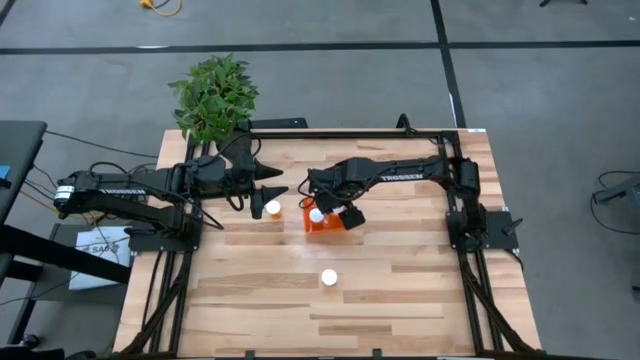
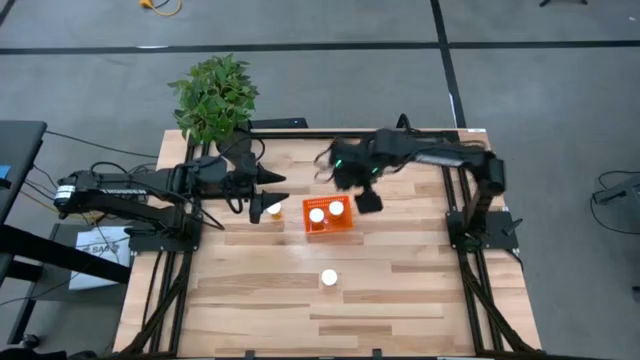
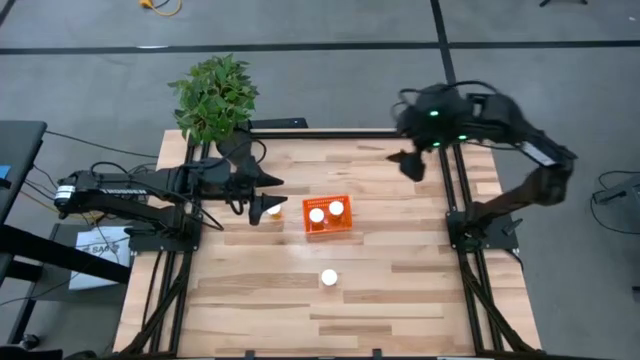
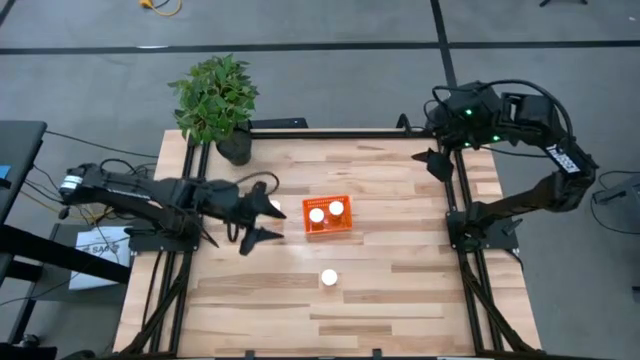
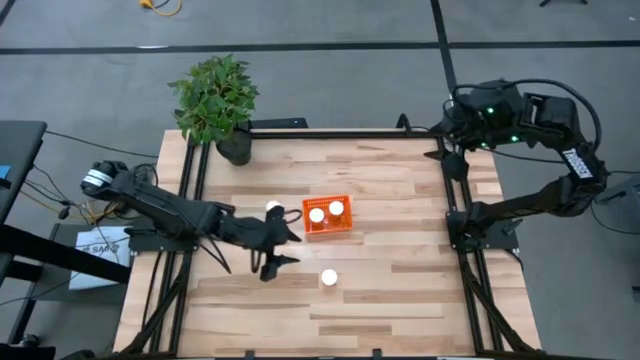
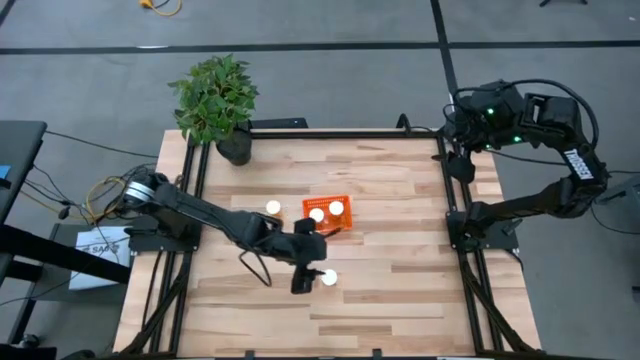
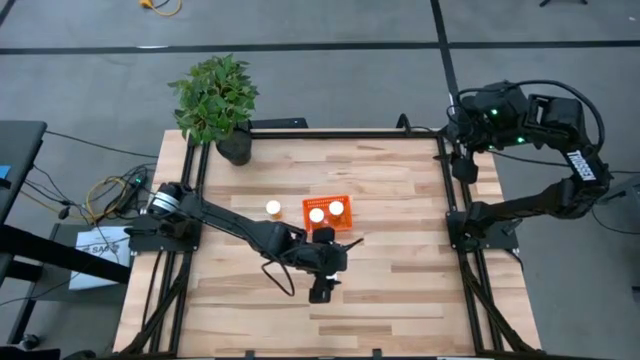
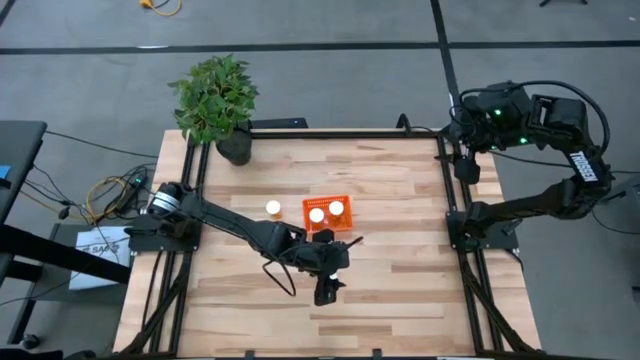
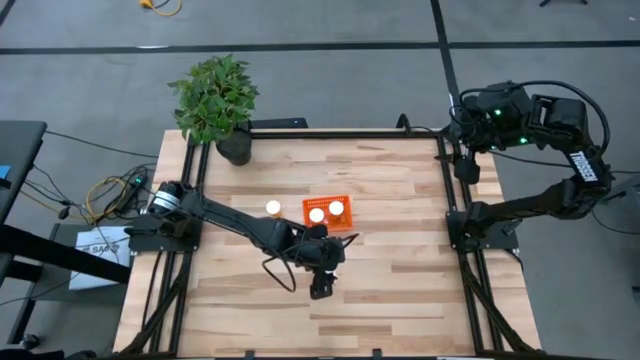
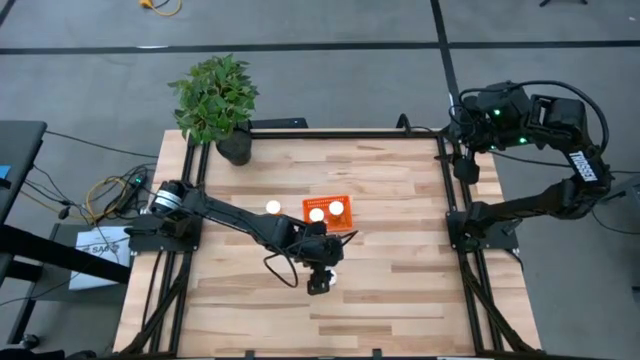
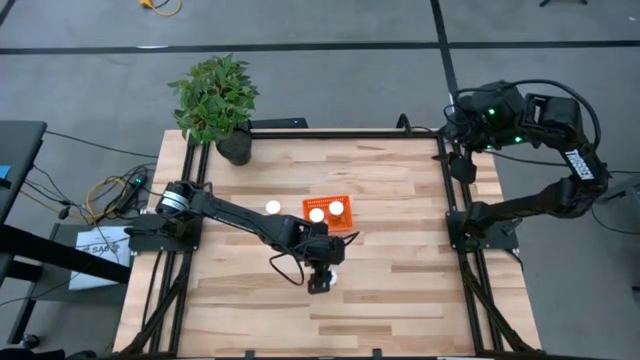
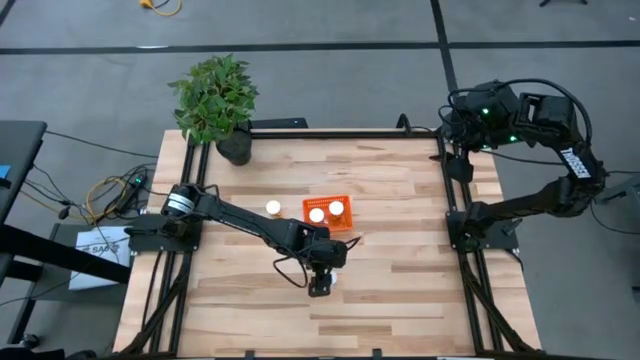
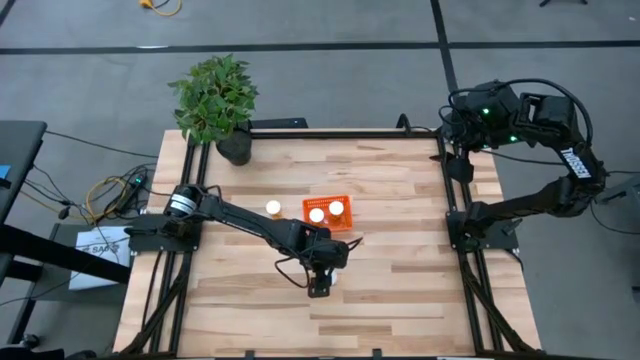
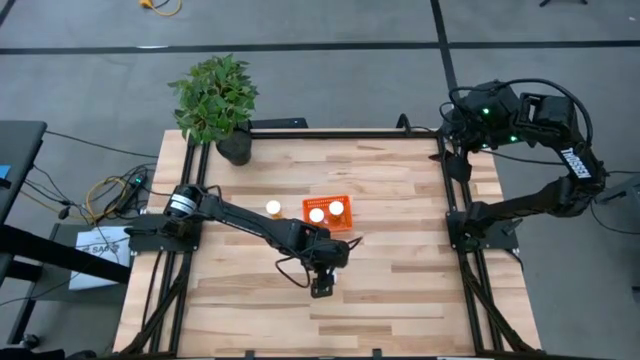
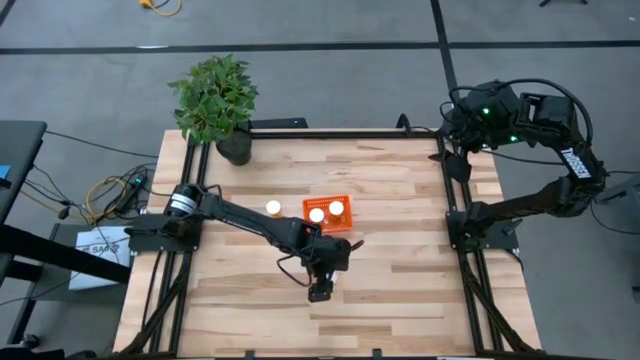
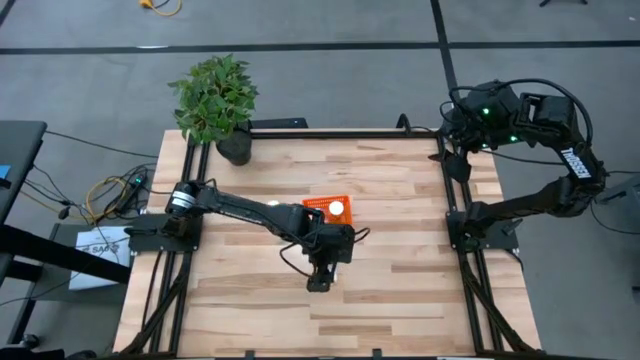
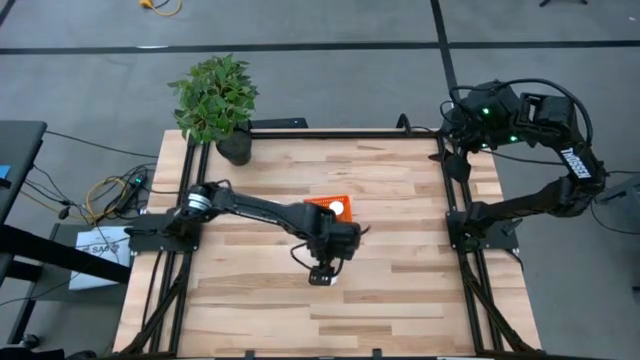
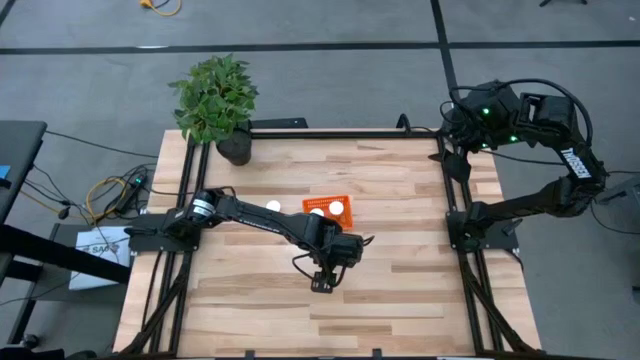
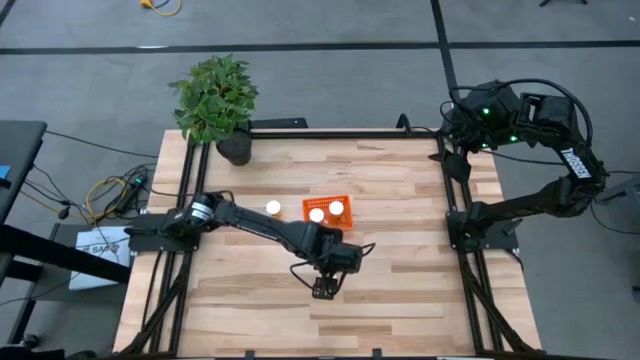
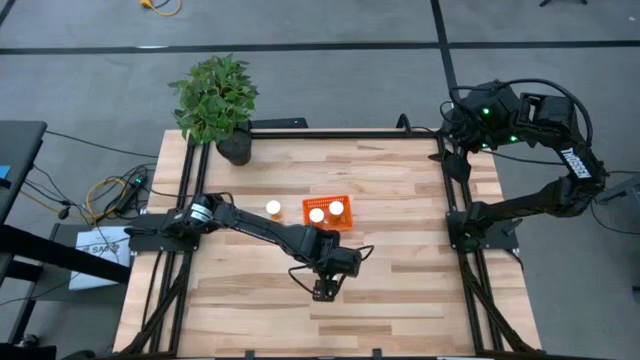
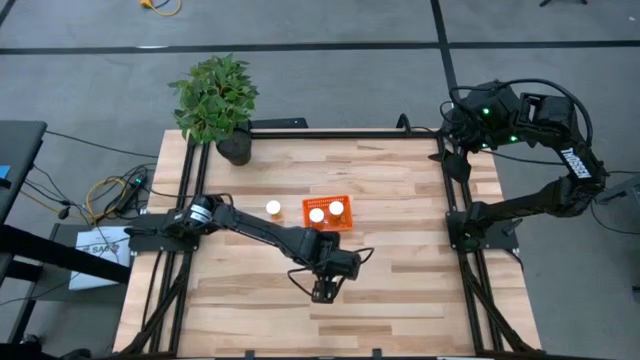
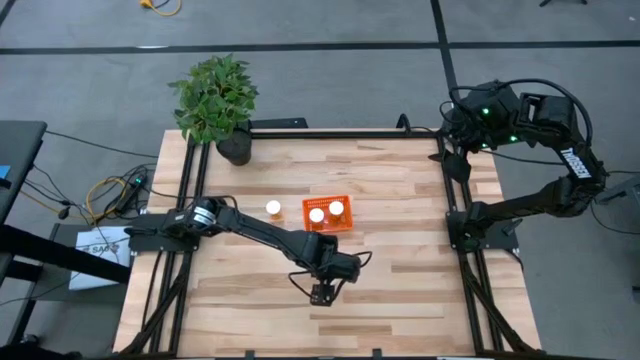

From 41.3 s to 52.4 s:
Task: Pick and place pill bottles into a basket
Put the orange pill bottle into the orange bin

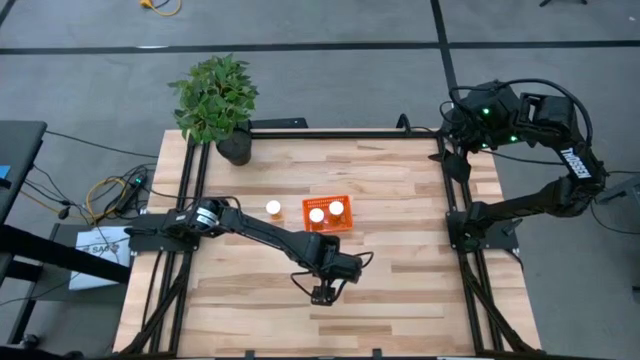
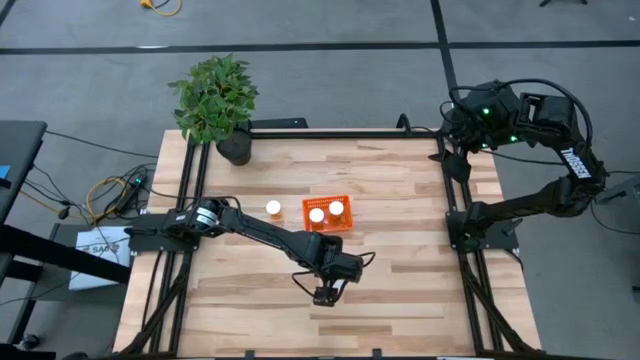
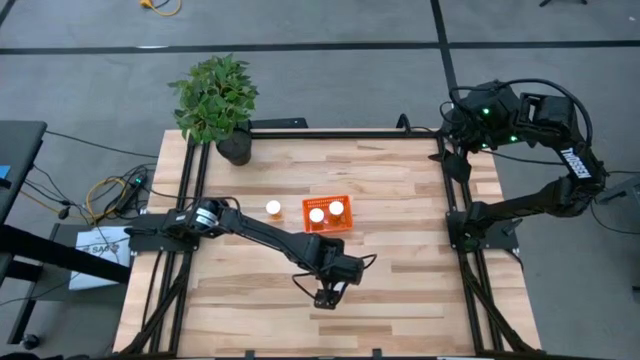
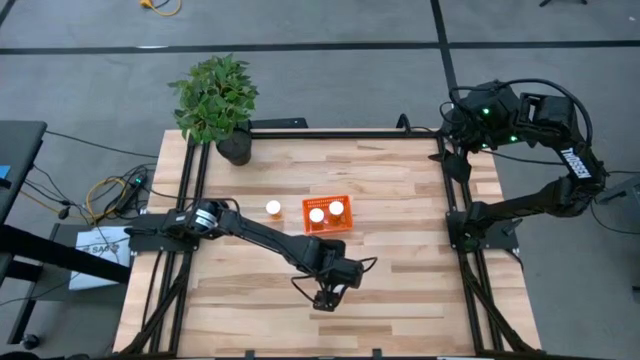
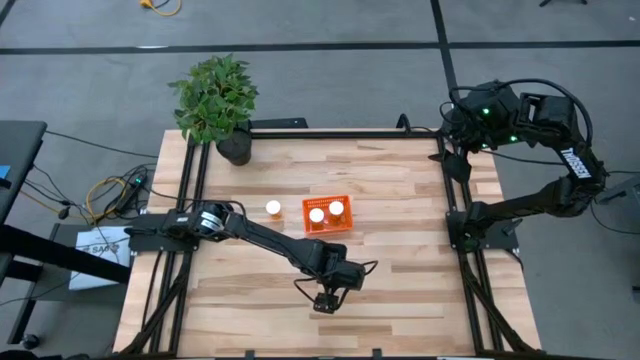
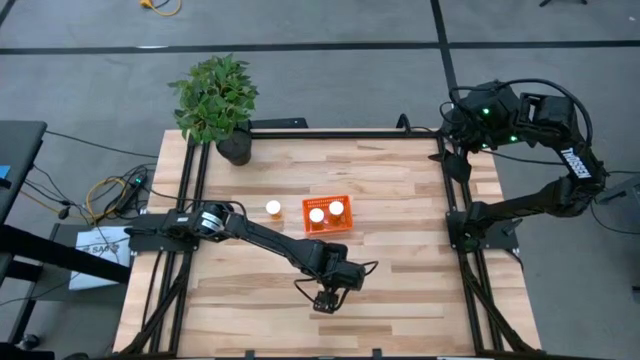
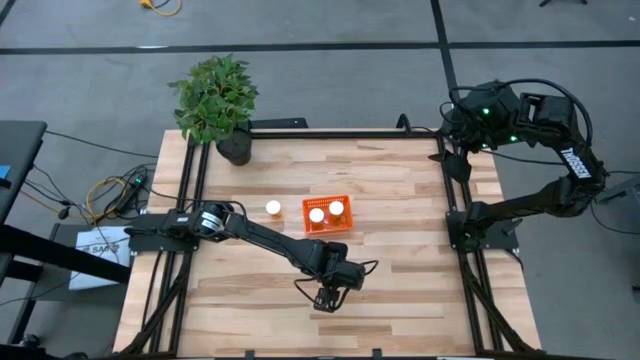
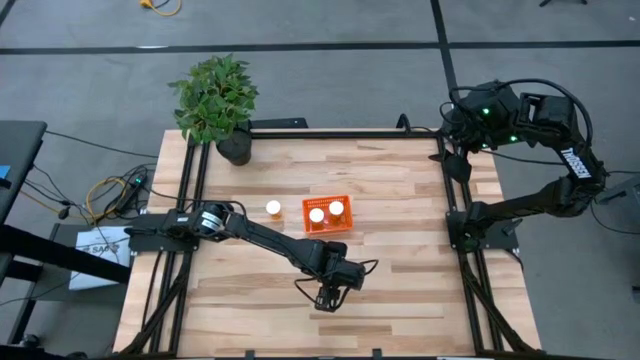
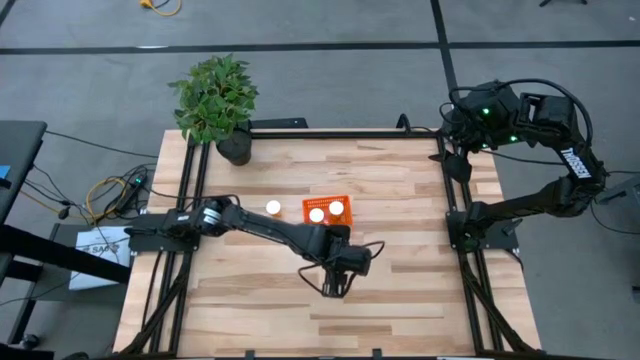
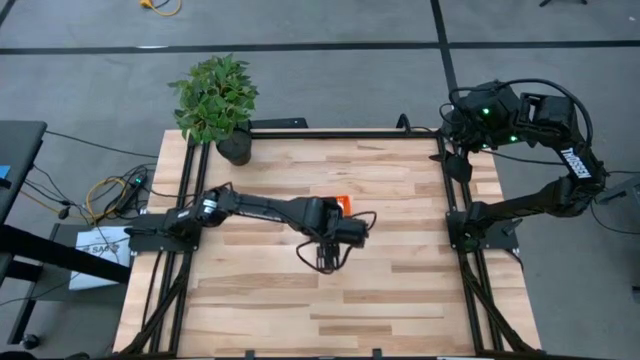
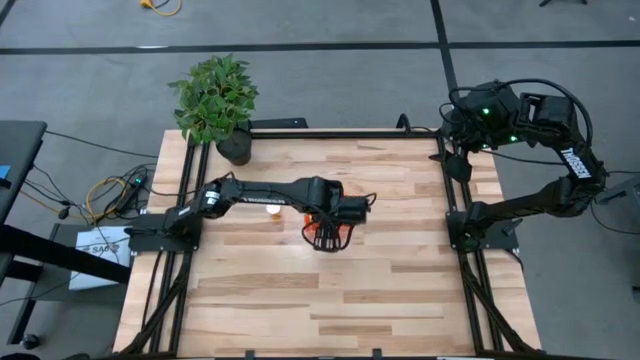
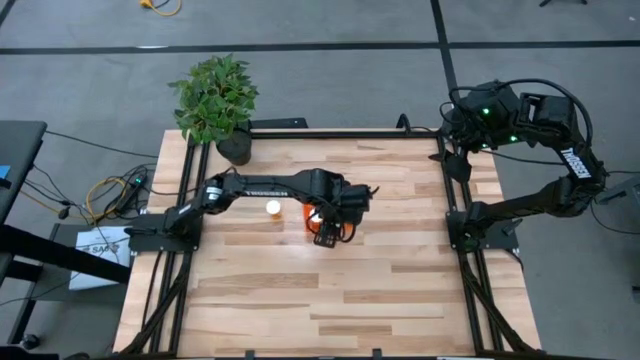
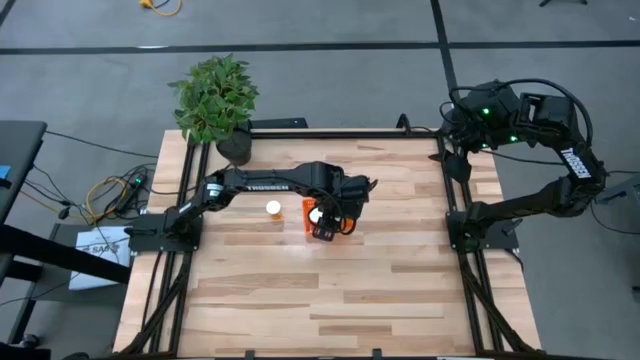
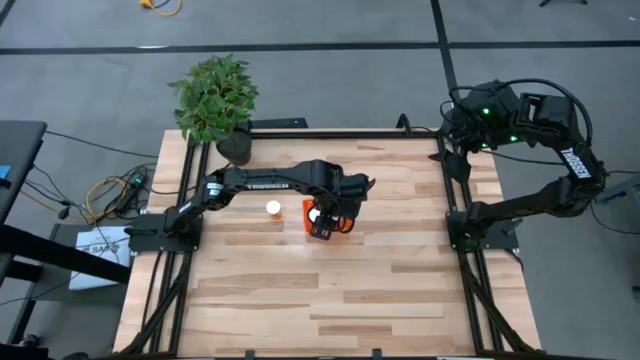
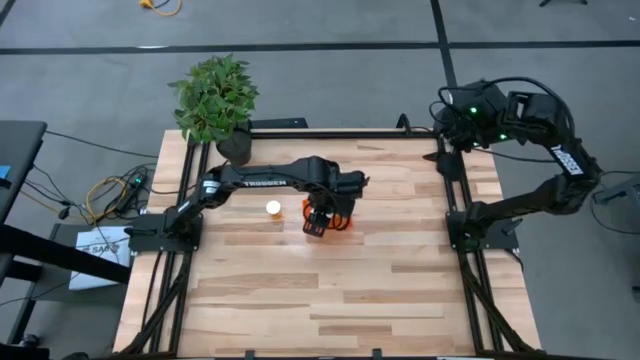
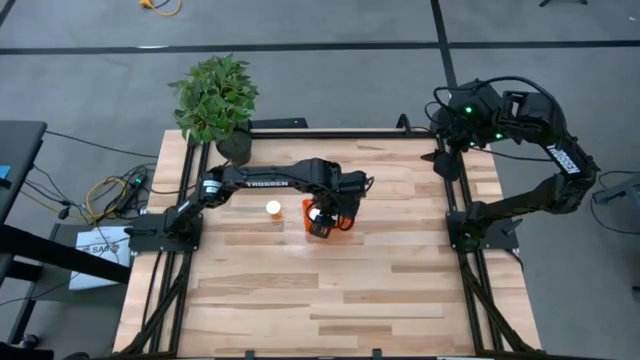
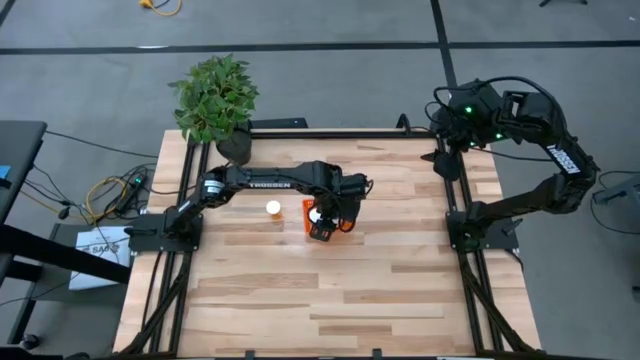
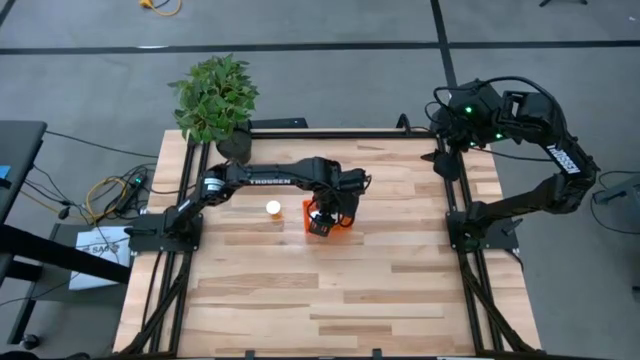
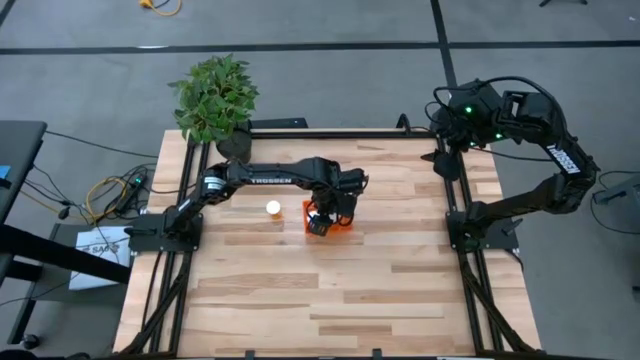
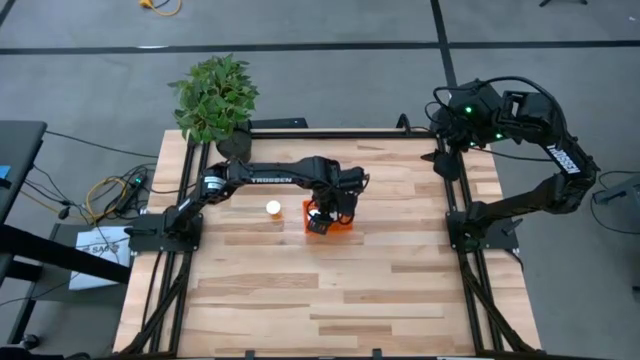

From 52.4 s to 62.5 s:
Put the orange pill bottle into the orange bin

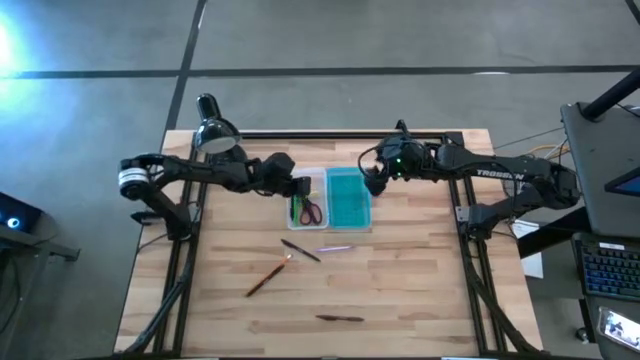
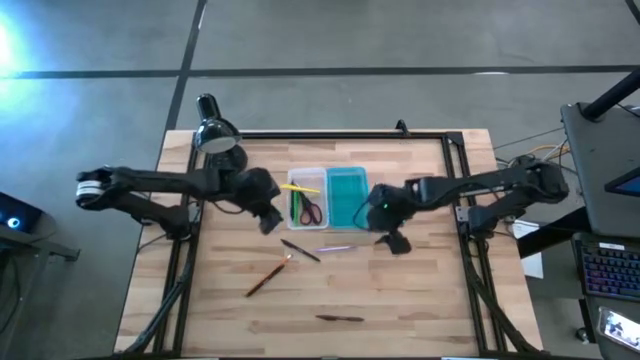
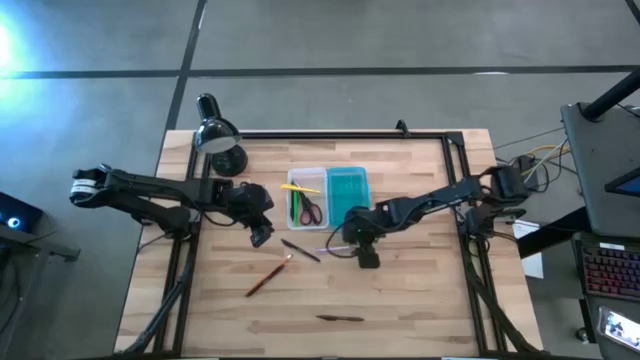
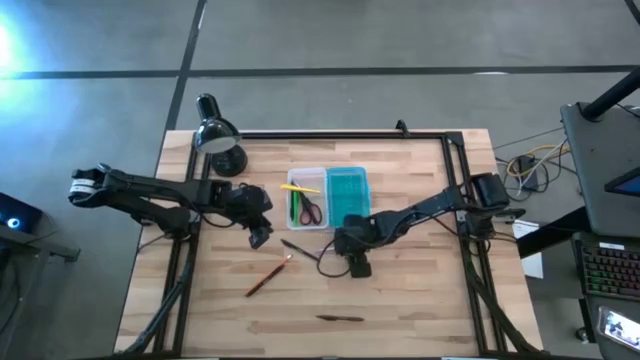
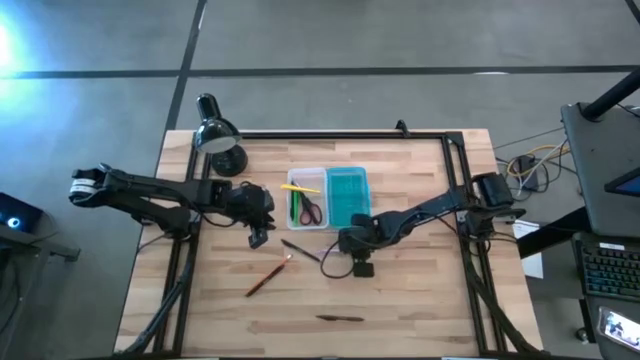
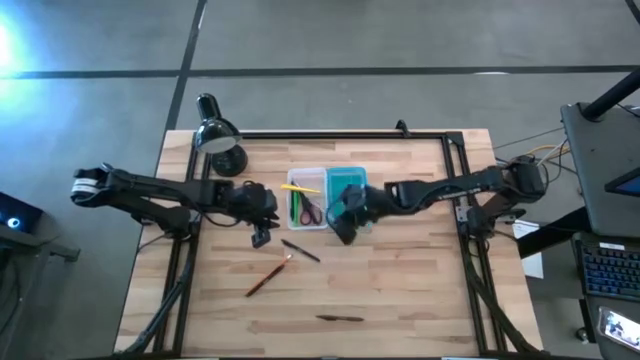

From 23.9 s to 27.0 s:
Task: Pick & place school supplies into a supply box
Put the purple pen into the supply box
